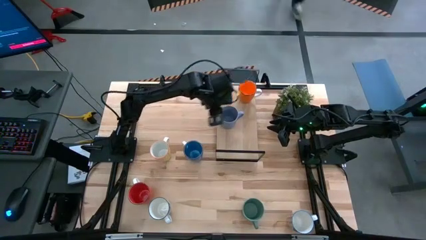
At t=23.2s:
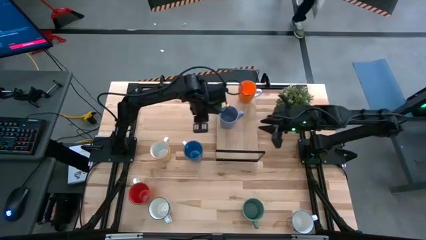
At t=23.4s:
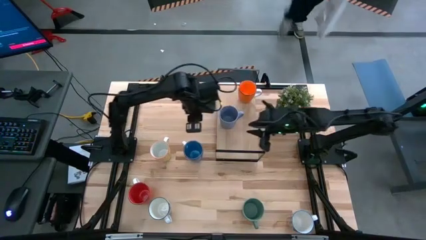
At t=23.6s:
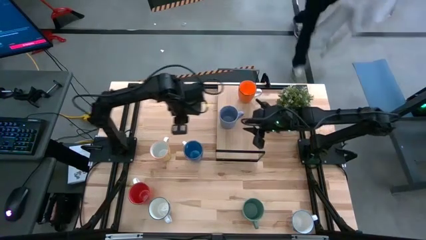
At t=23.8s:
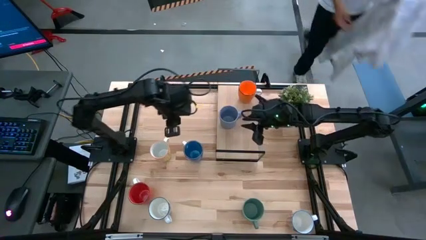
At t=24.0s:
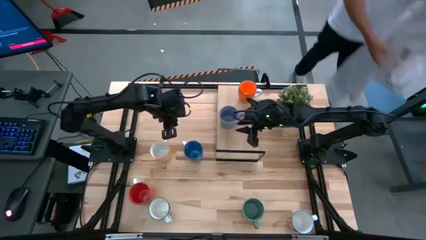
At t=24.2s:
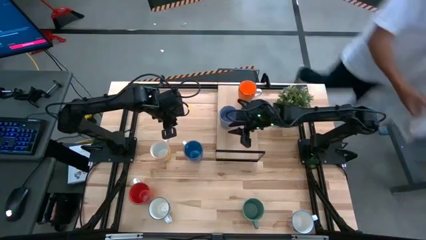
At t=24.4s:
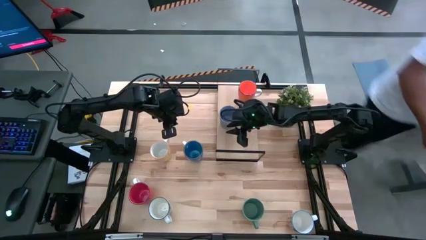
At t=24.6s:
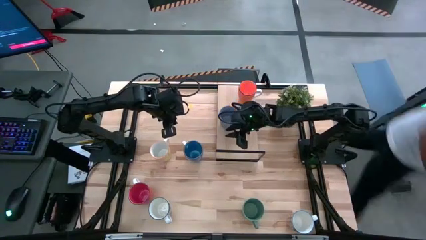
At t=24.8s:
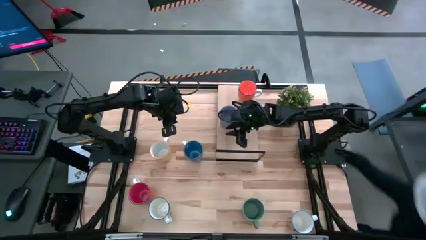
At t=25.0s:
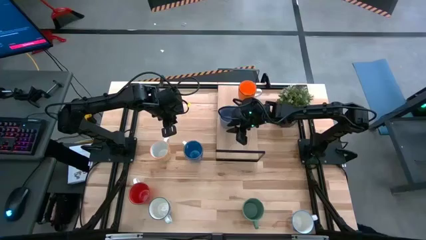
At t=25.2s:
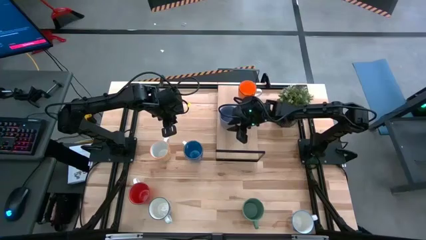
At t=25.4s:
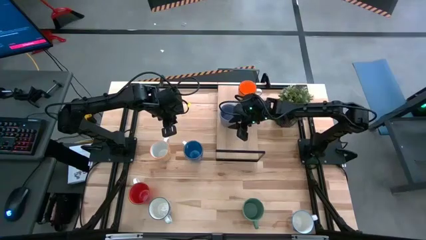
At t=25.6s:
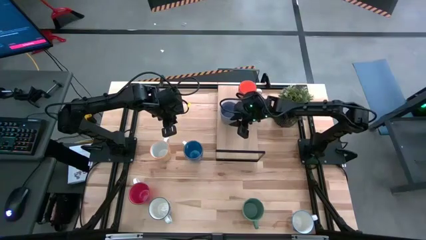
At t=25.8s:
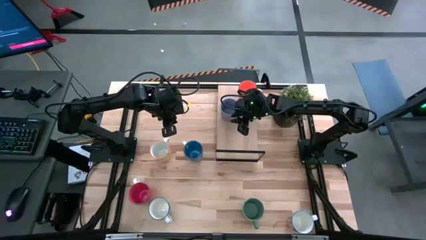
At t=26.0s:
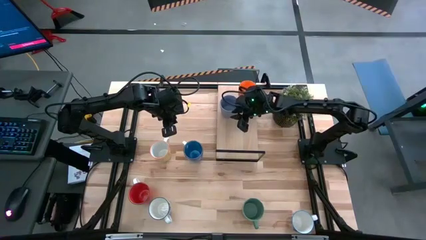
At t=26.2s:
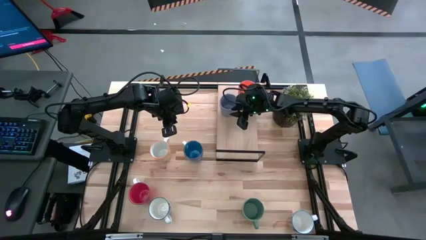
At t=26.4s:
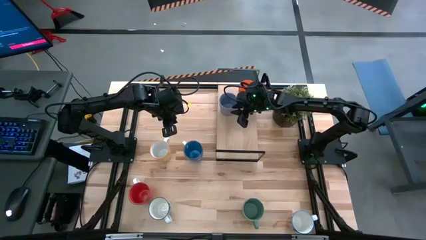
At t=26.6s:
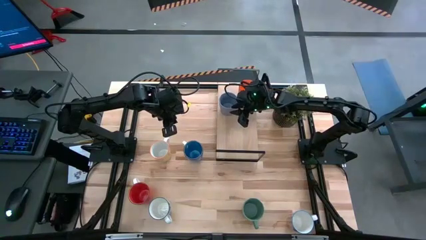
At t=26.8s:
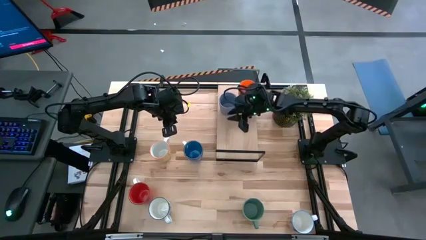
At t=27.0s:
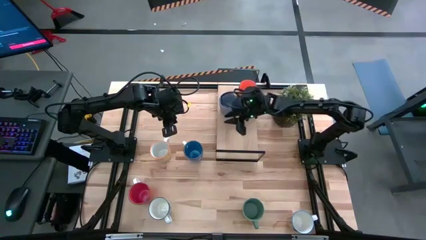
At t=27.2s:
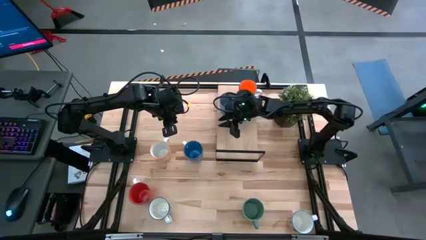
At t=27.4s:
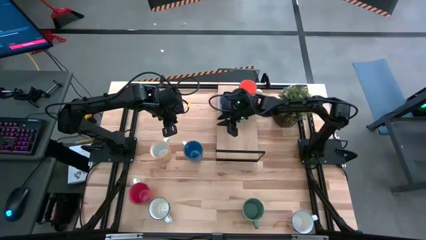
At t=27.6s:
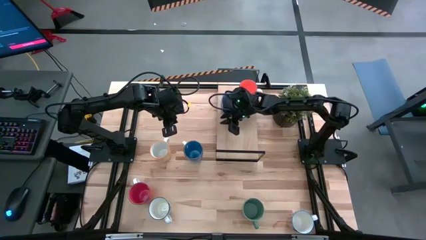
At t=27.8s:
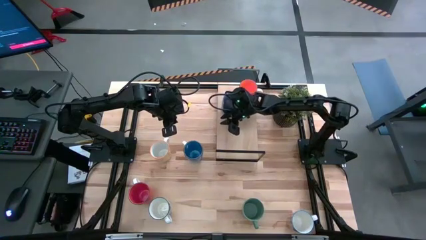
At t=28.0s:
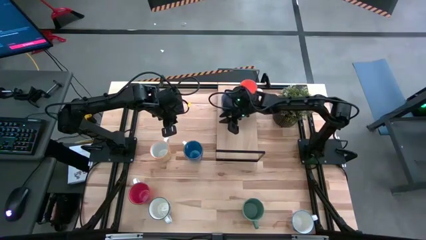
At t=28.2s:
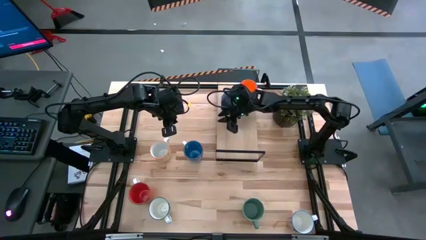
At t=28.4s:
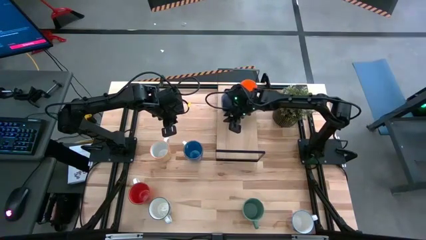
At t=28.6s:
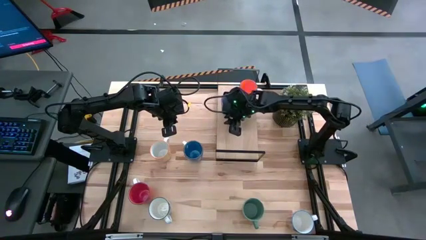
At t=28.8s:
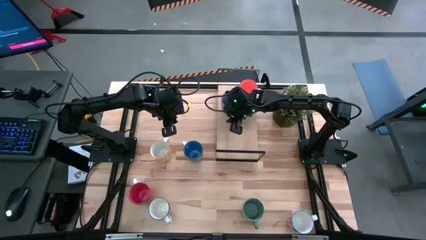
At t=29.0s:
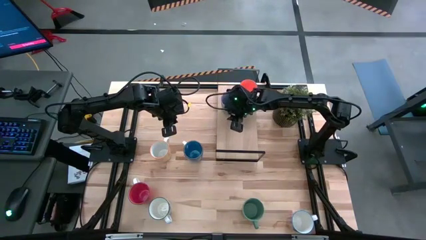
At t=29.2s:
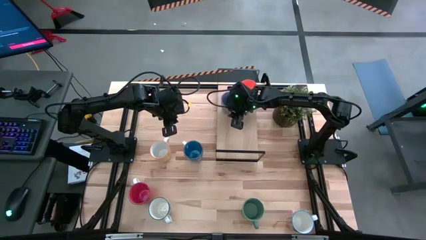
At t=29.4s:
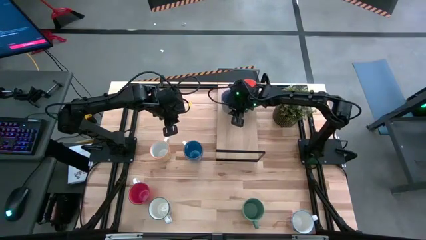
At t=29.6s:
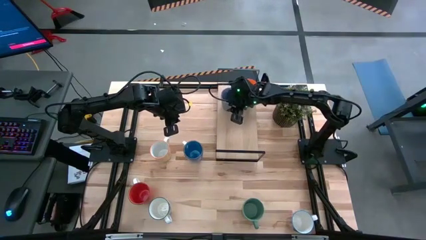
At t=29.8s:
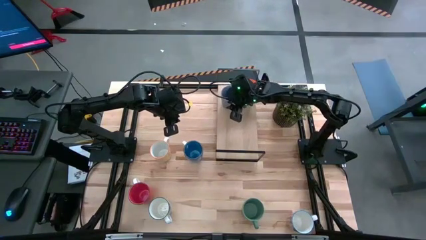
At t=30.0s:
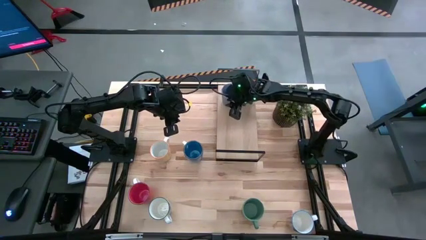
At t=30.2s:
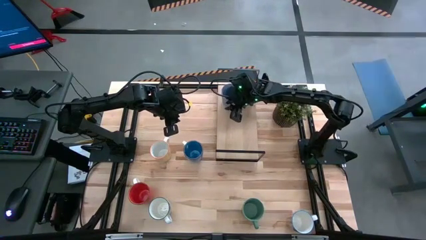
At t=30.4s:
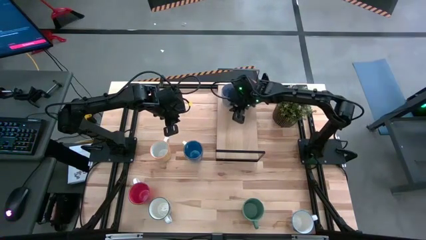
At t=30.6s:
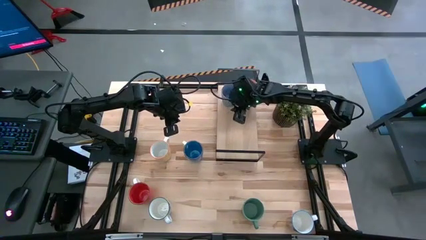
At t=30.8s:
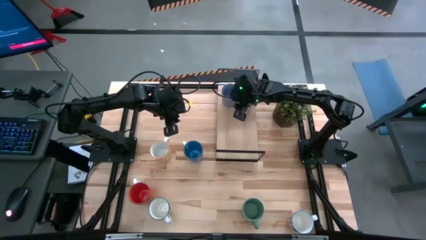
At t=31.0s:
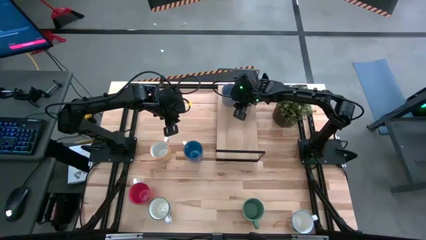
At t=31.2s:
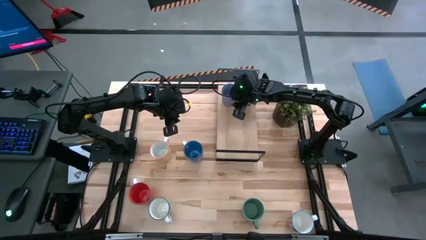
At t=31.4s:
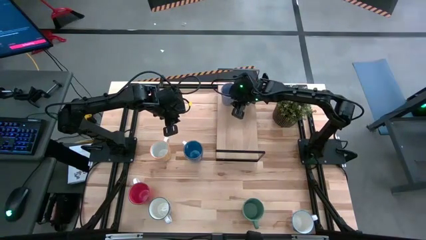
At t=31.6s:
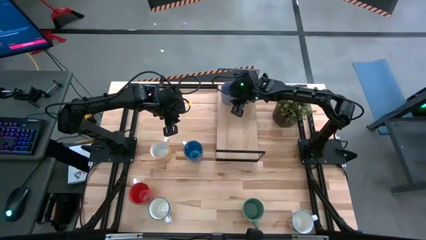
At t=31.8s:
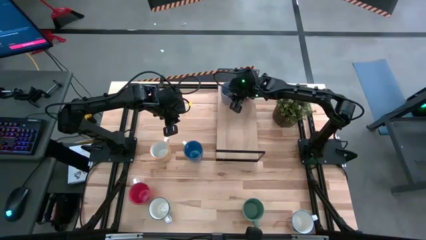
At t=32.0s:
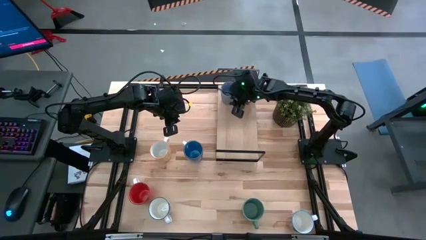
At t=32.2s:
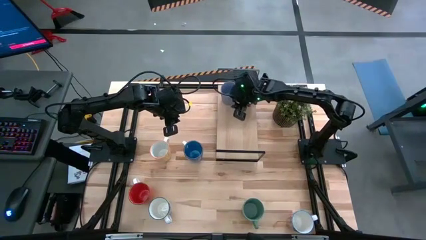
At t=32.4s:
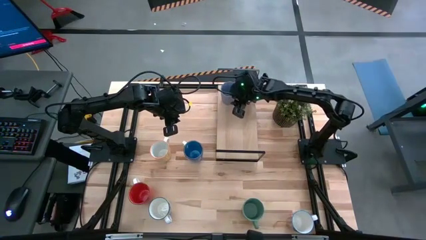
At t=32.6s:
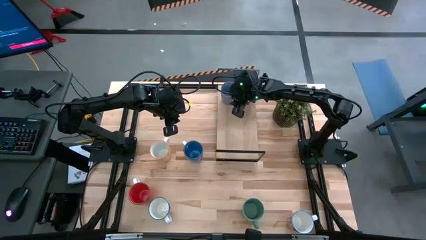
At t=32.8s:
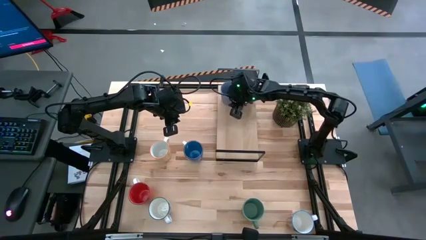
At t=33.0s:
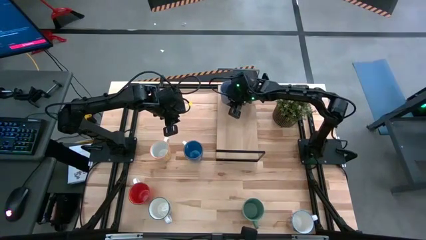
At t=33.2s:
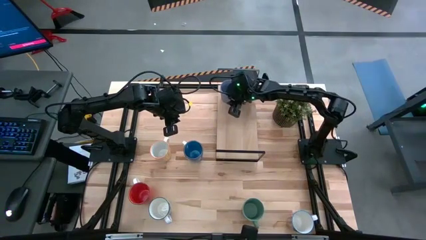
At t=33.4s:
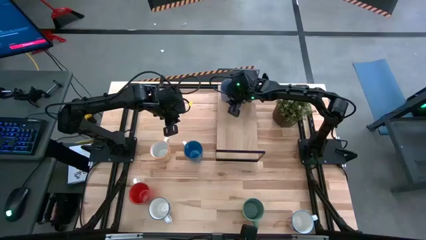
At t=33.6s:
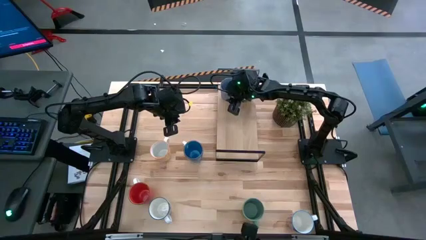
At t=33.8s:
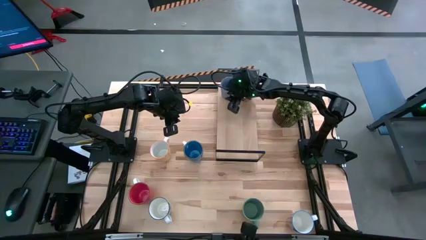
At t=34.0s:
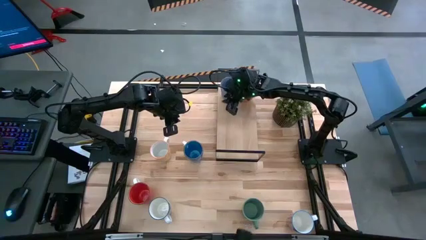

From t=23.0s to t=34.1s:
Task: Place coffee mugs
Put the light blue mug on the shelf to the left side of the orange mug
